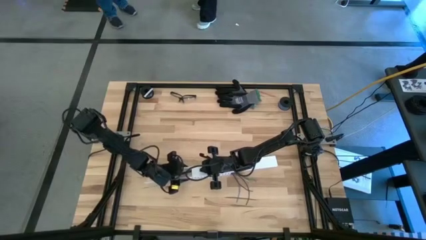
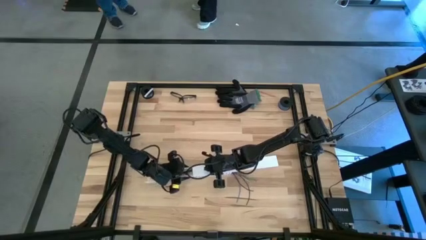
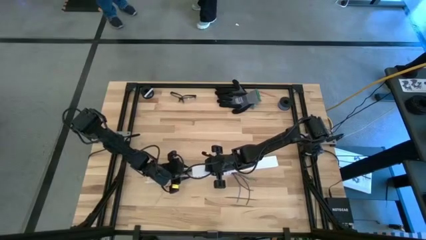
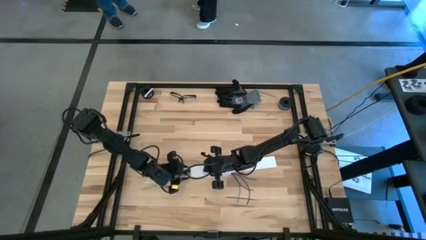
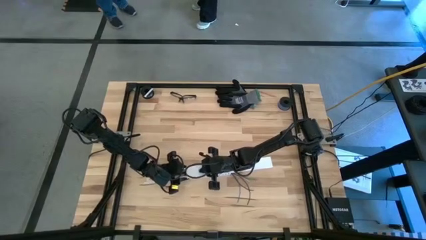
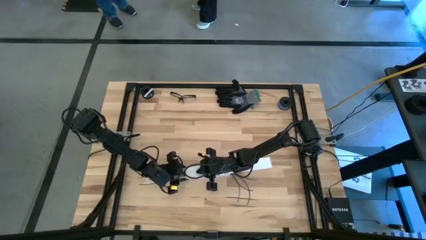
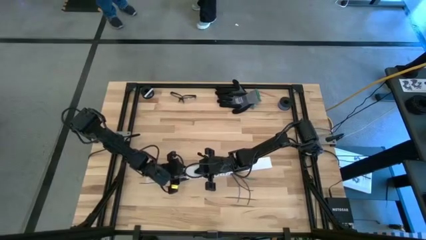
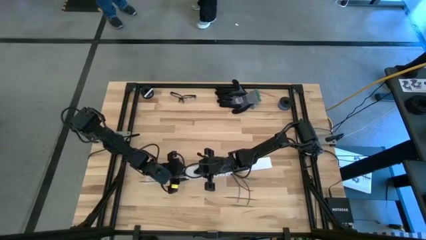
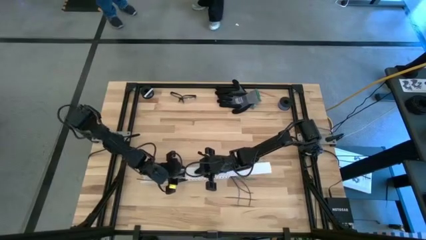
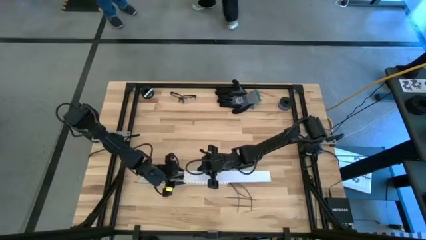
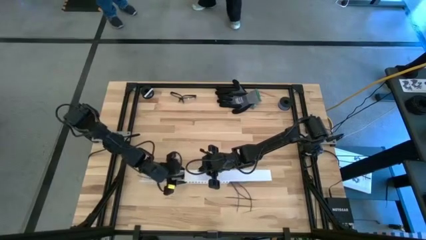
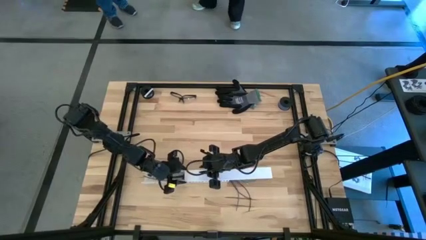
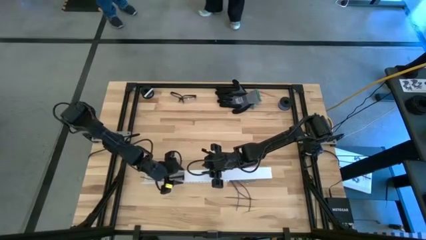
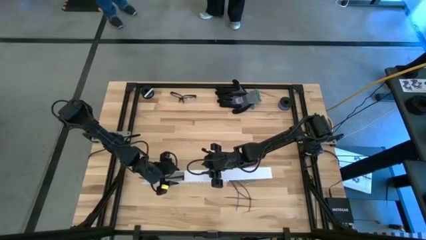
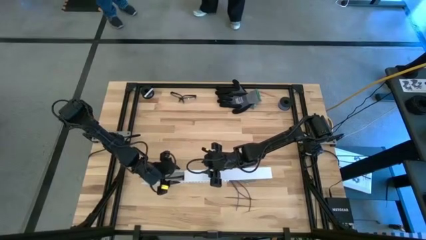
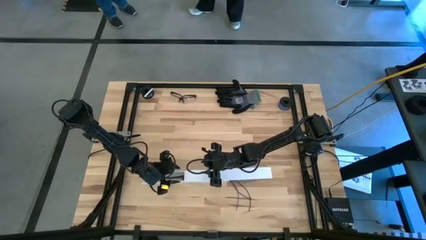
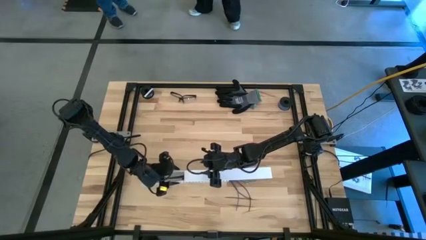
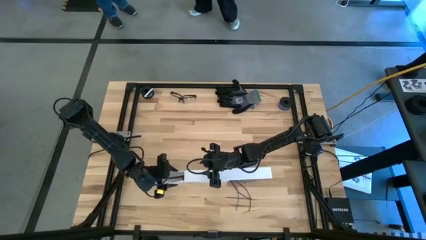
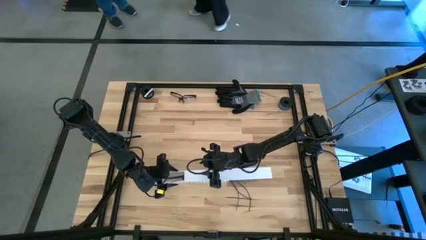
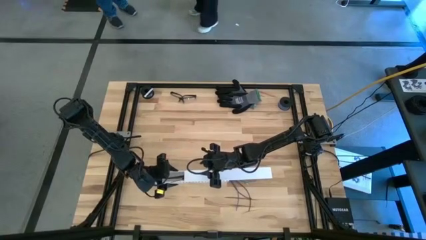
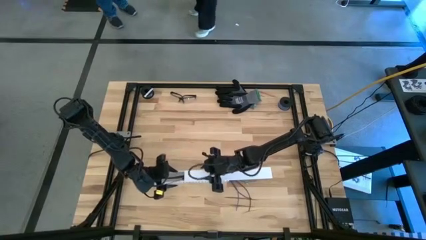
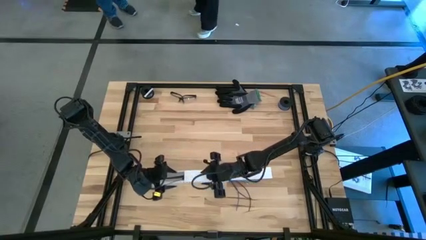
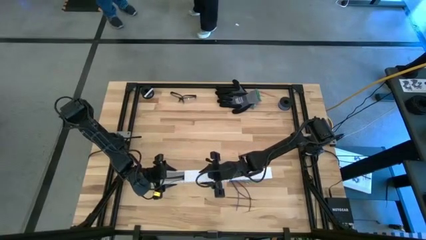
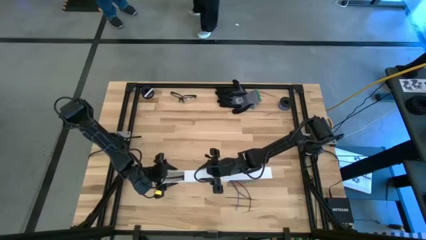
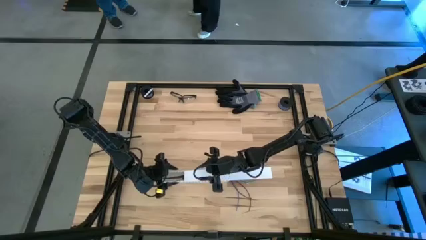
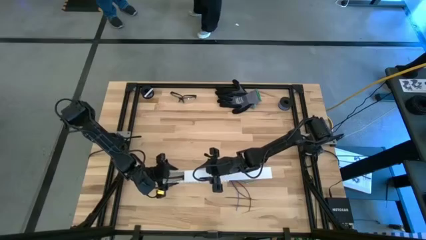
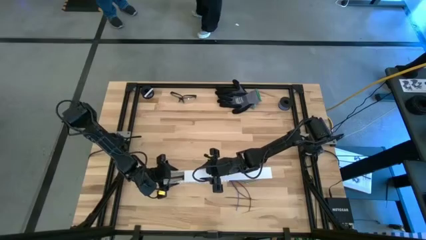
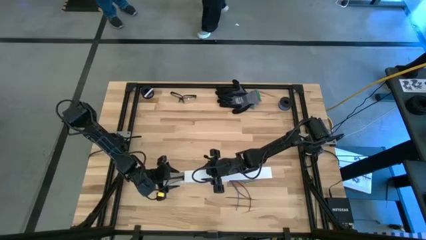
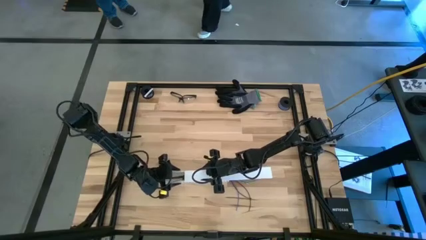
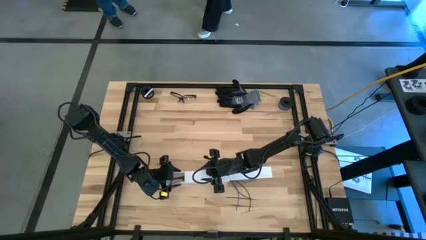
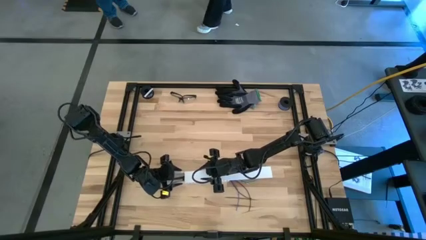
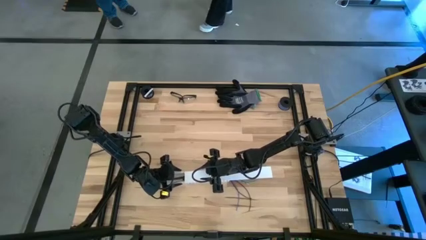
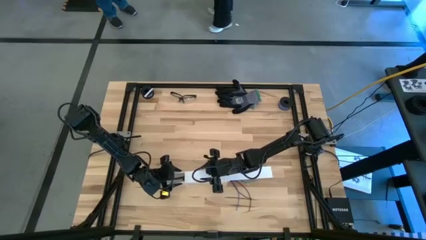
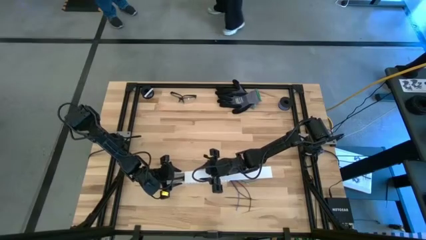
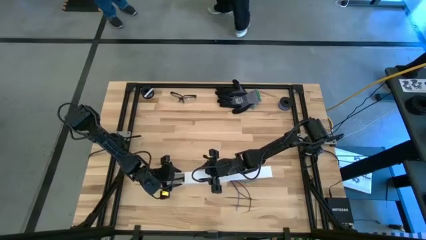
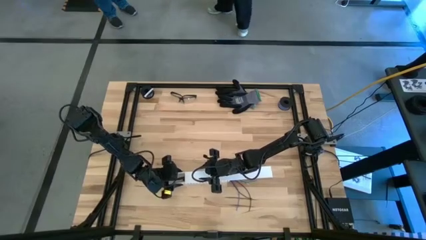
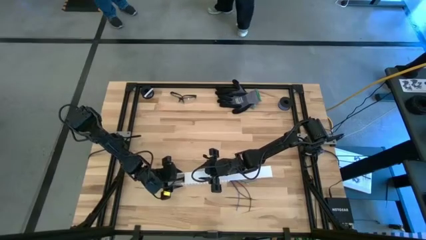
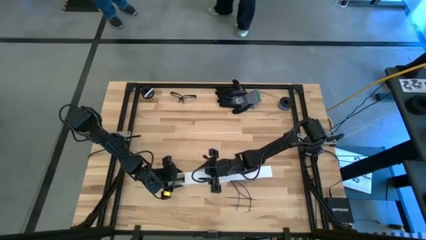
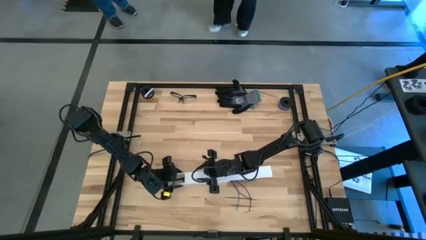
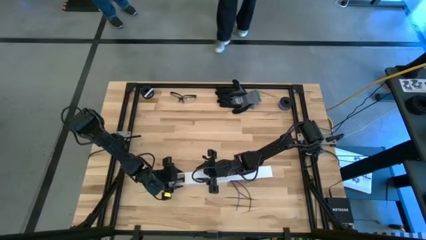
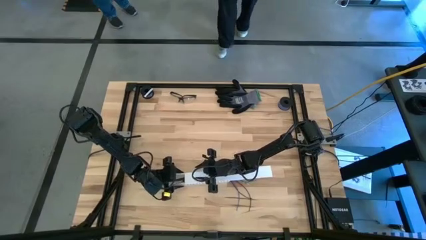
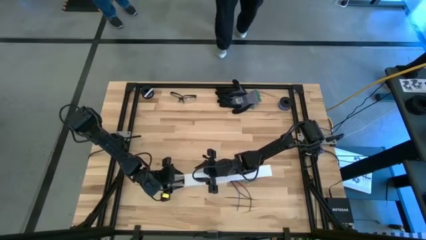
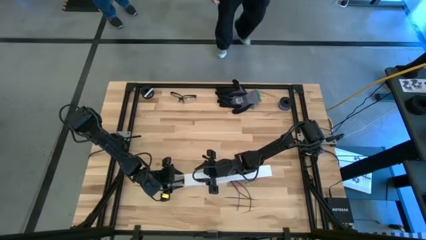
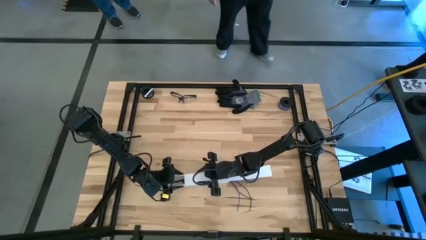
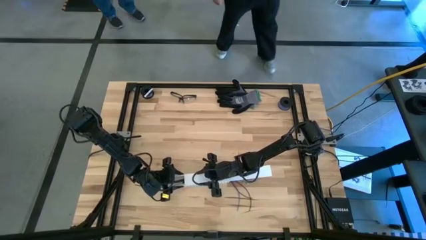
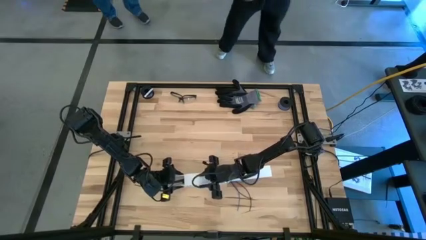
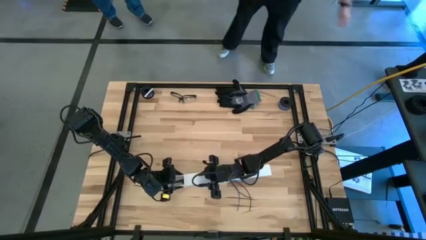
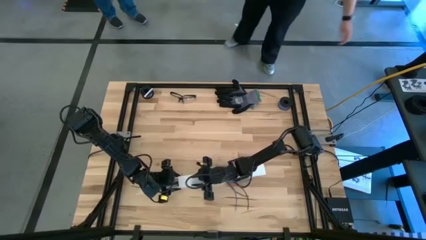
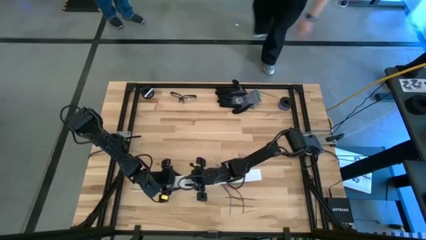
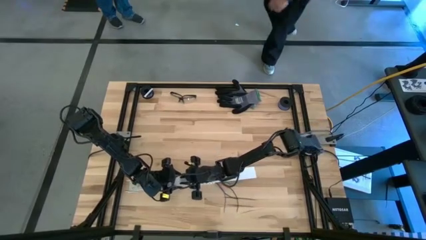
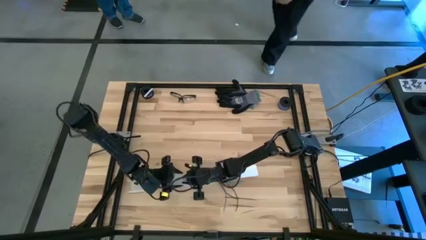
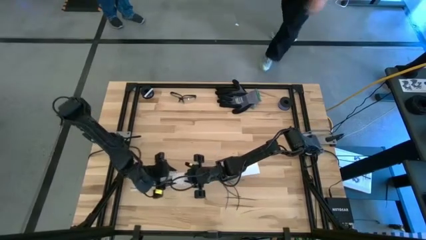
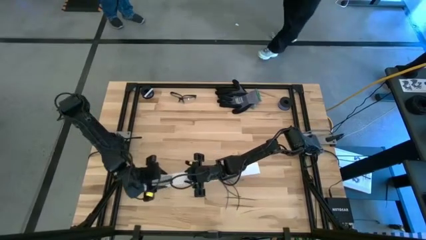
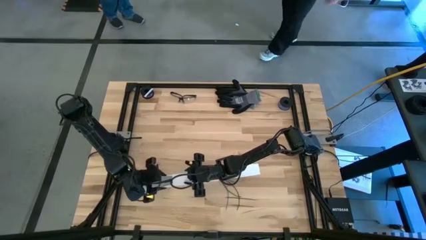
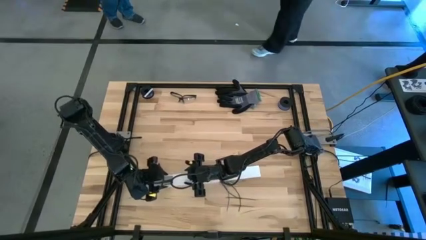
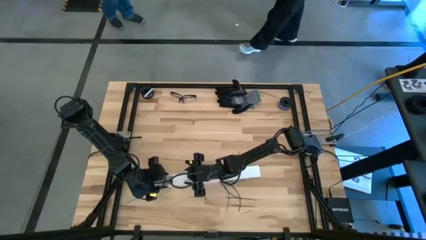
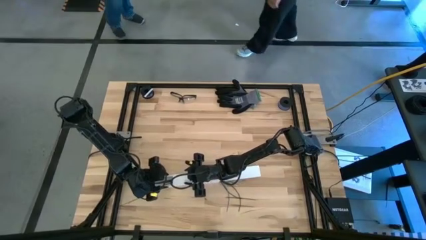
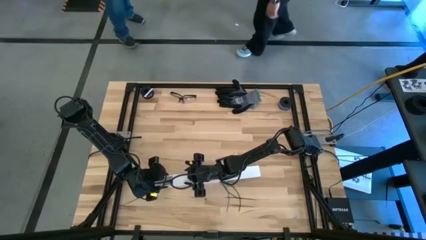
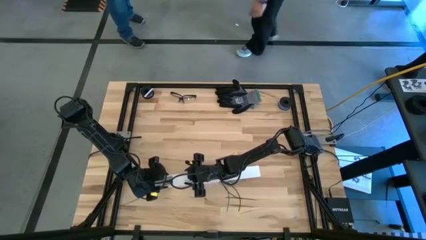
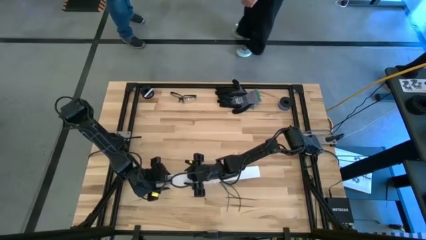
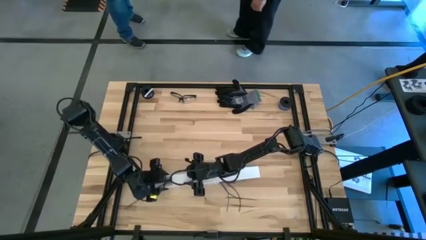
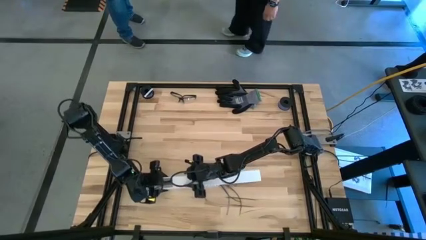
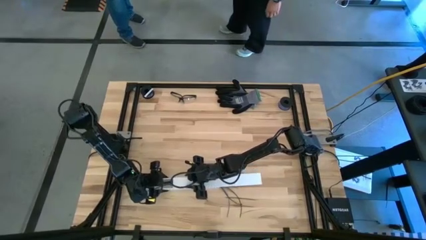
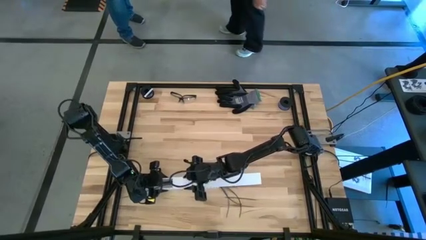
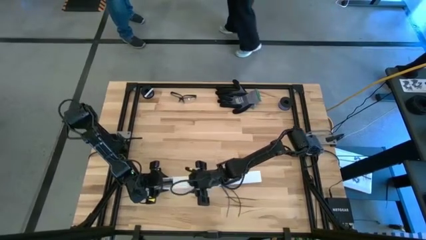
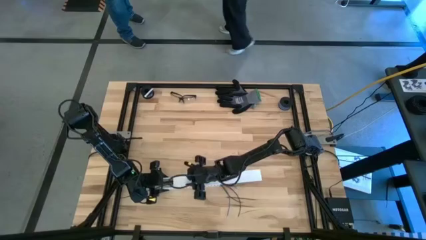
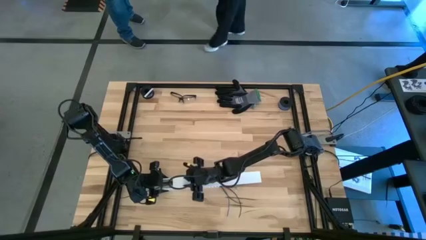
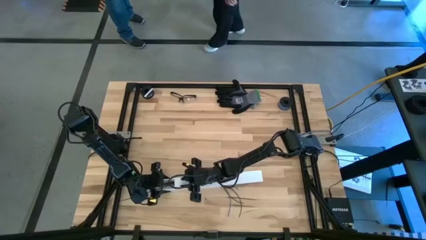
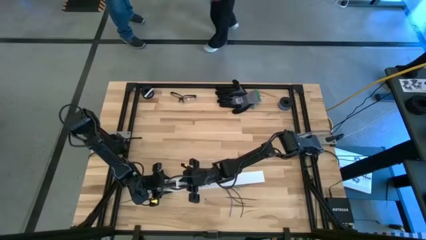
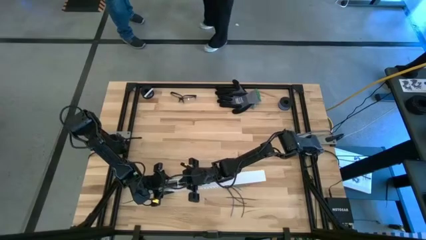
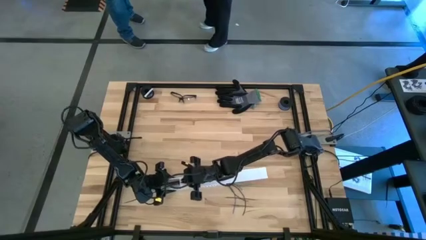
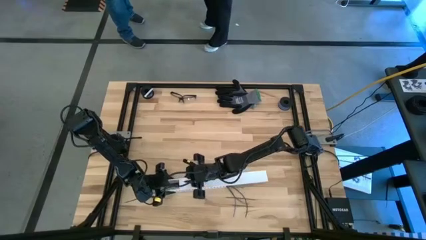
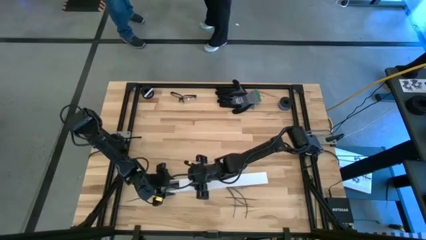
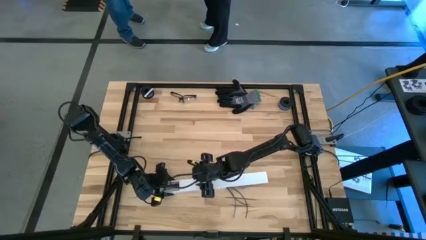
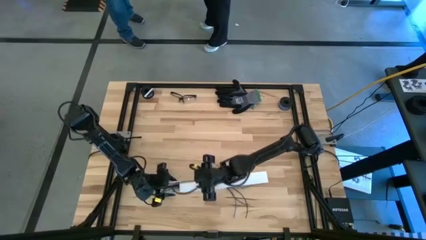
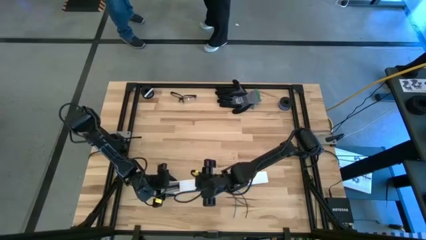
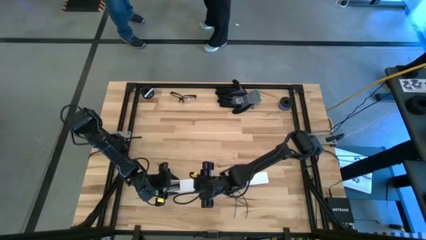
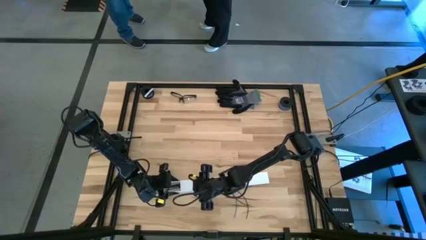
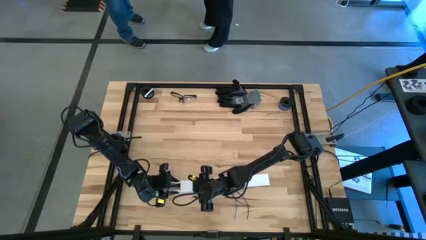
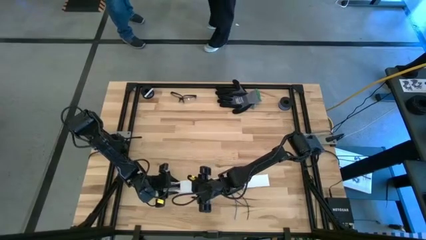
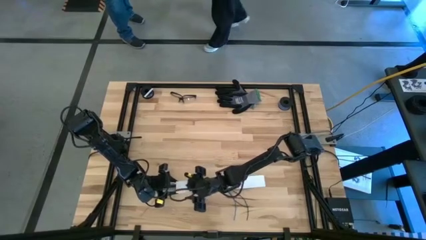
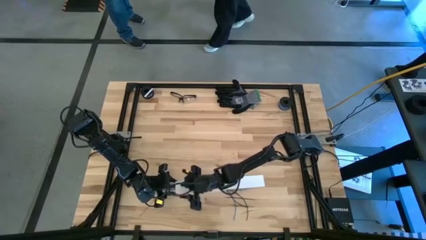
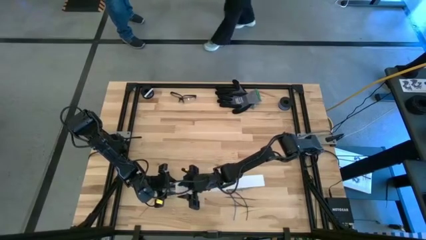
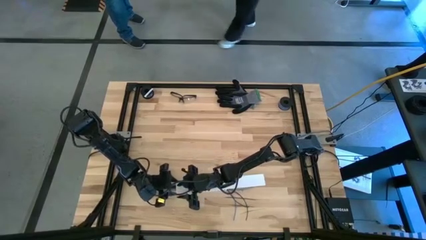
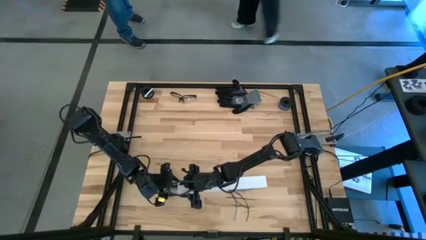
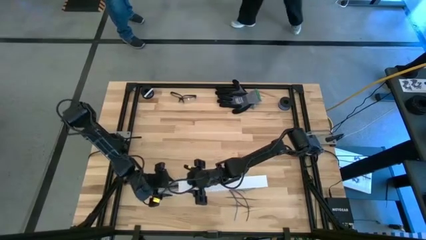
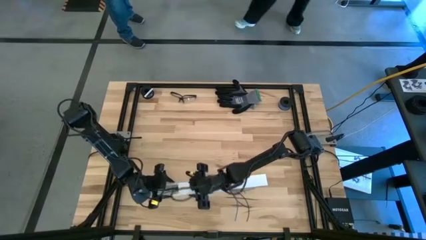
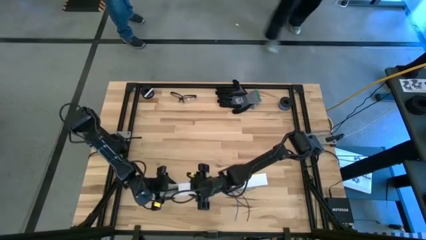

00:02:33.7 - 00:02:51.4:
Task: Ziptie cables
Close the cable duct
